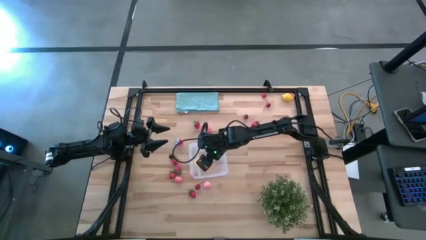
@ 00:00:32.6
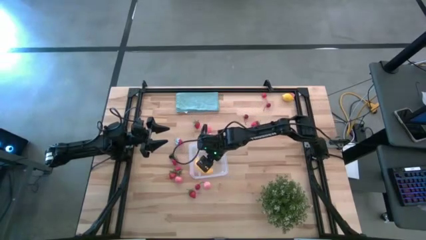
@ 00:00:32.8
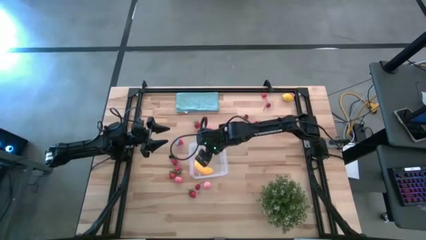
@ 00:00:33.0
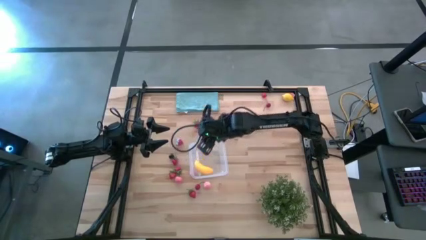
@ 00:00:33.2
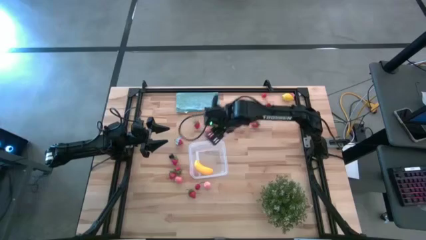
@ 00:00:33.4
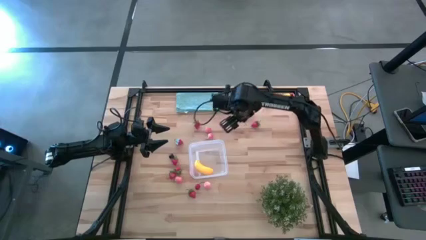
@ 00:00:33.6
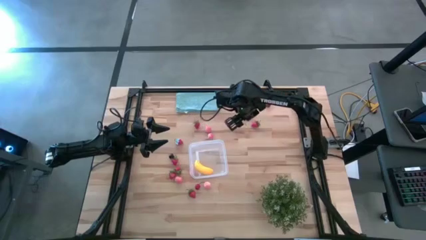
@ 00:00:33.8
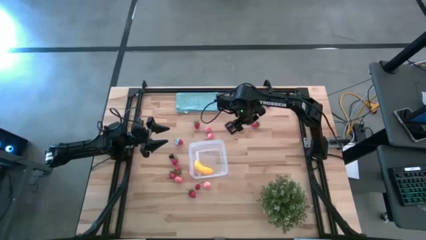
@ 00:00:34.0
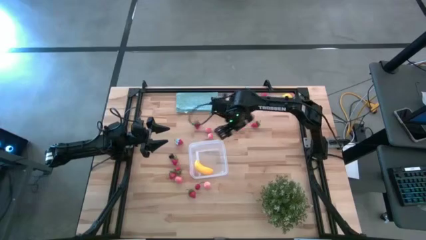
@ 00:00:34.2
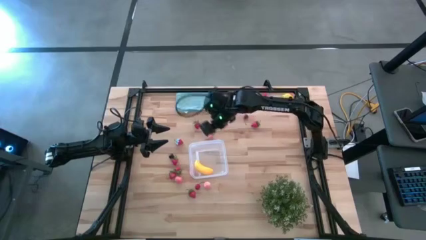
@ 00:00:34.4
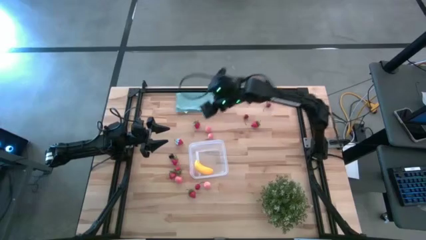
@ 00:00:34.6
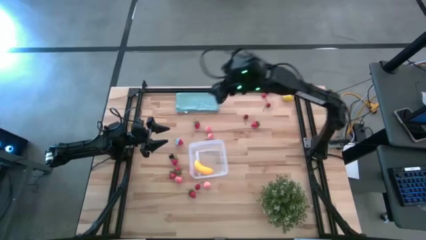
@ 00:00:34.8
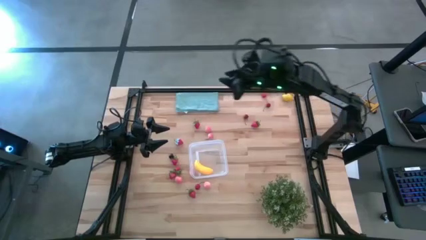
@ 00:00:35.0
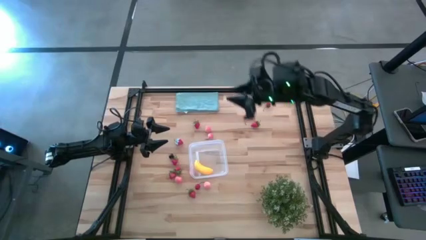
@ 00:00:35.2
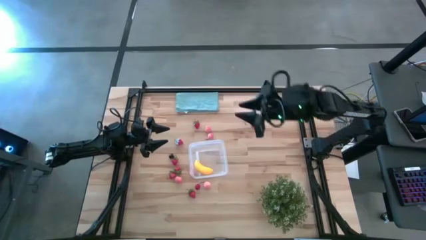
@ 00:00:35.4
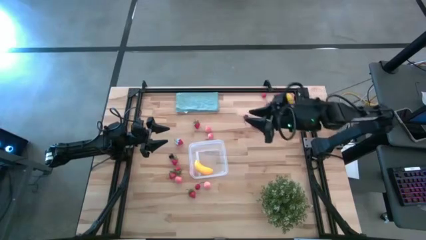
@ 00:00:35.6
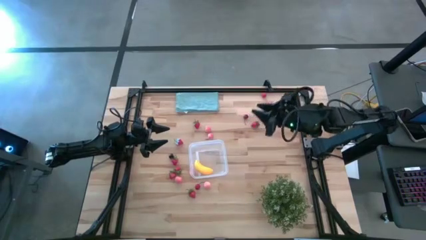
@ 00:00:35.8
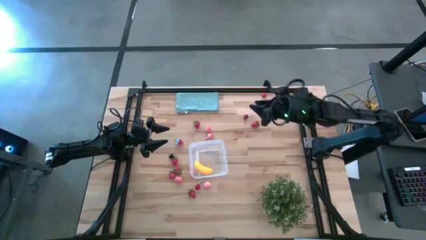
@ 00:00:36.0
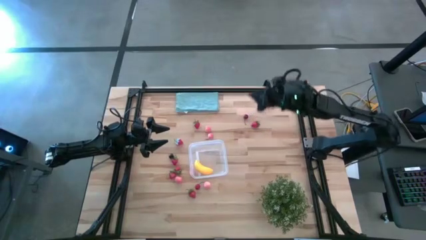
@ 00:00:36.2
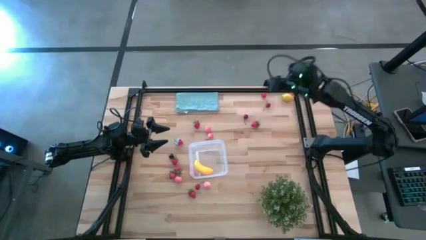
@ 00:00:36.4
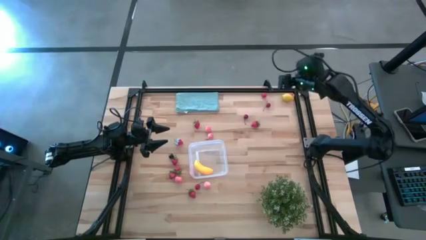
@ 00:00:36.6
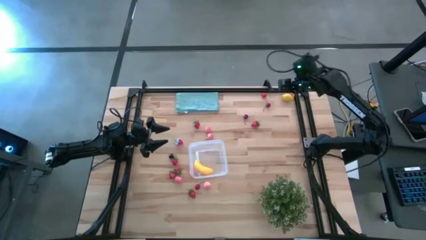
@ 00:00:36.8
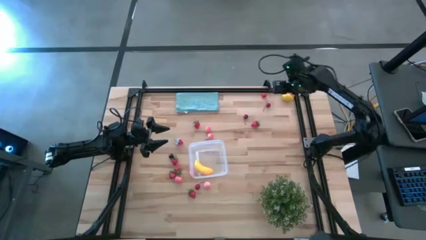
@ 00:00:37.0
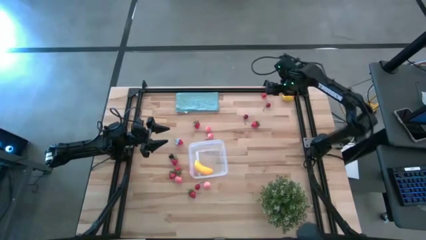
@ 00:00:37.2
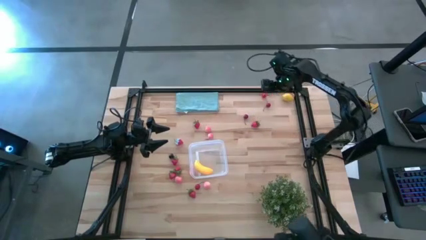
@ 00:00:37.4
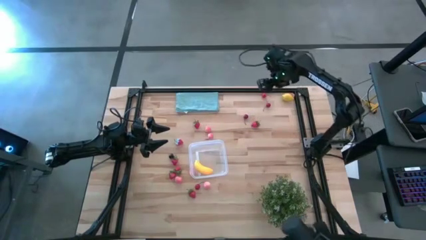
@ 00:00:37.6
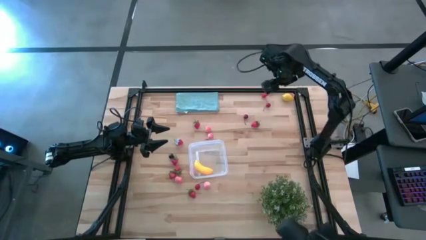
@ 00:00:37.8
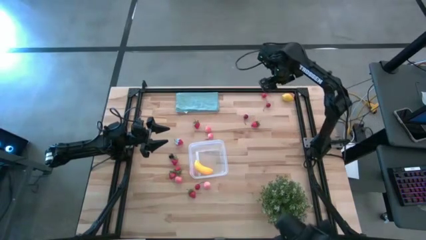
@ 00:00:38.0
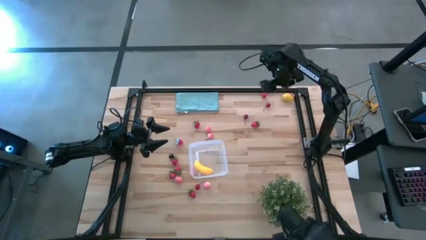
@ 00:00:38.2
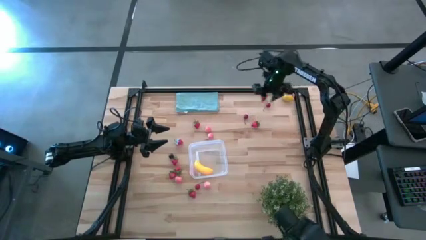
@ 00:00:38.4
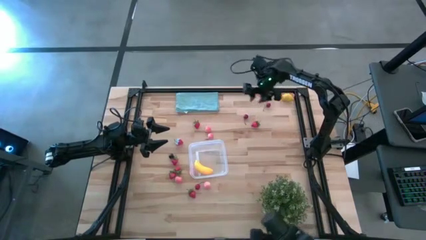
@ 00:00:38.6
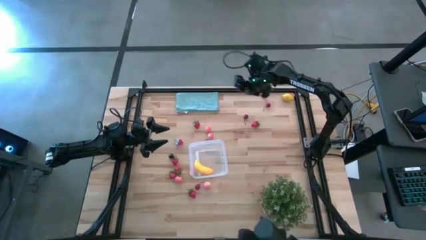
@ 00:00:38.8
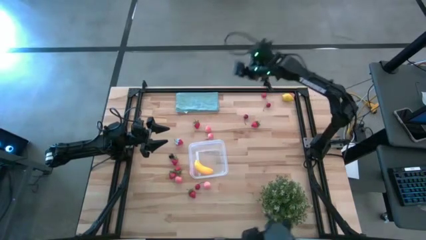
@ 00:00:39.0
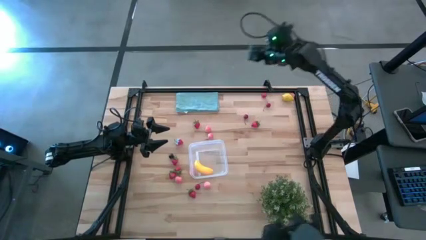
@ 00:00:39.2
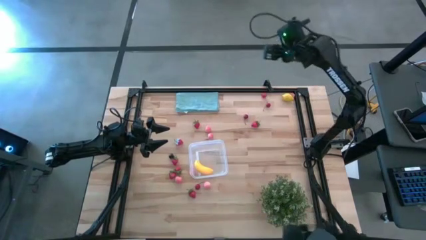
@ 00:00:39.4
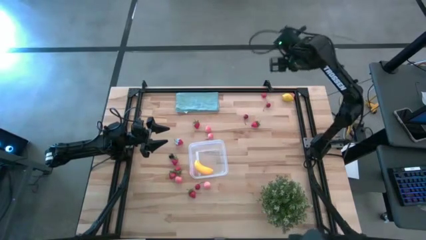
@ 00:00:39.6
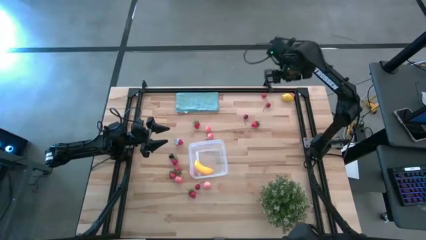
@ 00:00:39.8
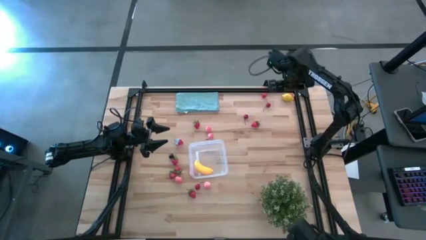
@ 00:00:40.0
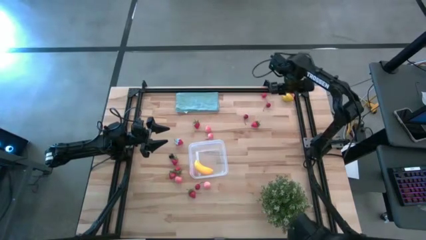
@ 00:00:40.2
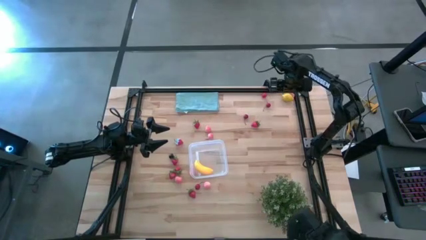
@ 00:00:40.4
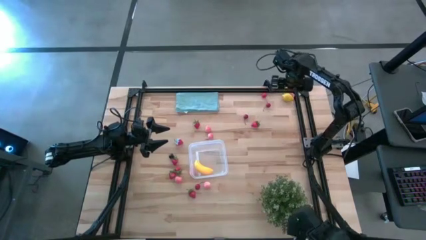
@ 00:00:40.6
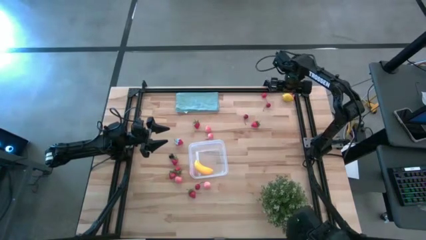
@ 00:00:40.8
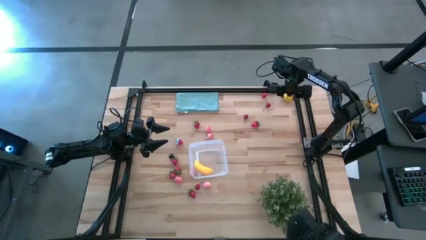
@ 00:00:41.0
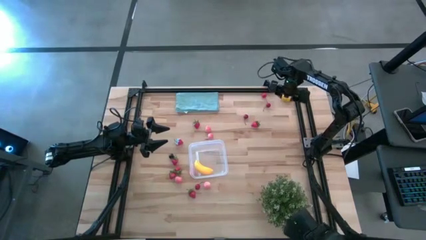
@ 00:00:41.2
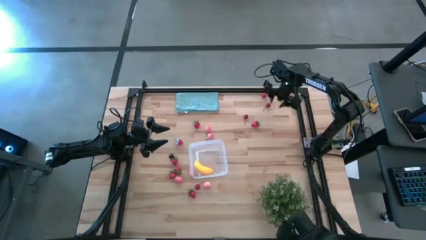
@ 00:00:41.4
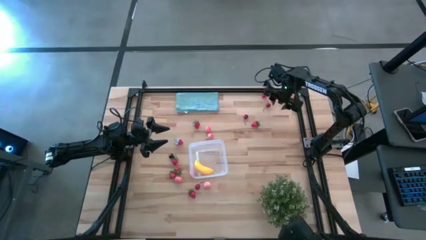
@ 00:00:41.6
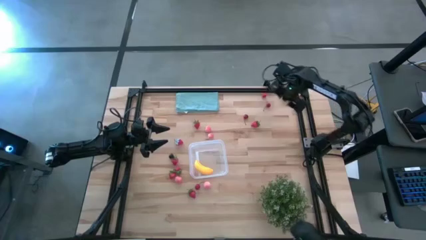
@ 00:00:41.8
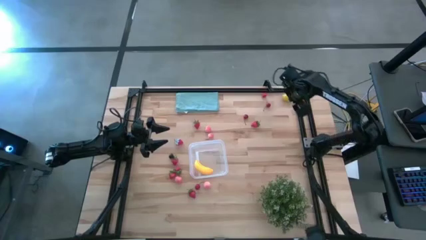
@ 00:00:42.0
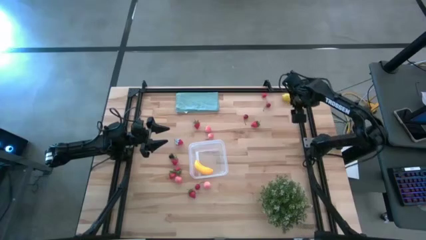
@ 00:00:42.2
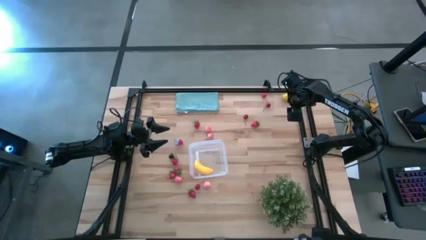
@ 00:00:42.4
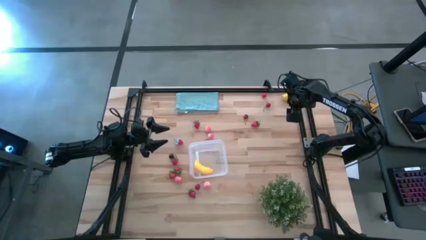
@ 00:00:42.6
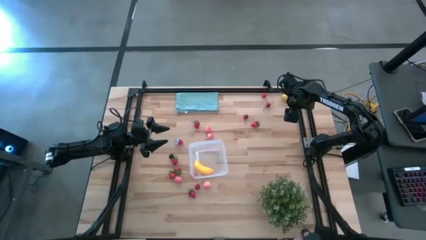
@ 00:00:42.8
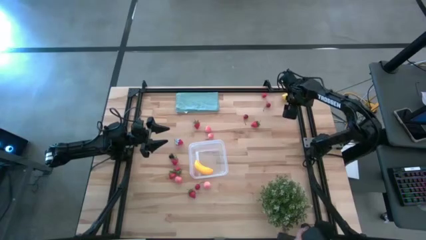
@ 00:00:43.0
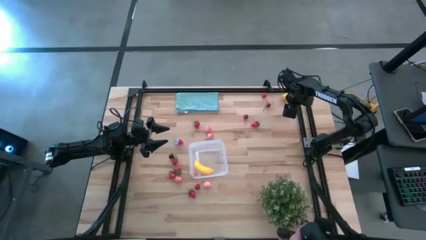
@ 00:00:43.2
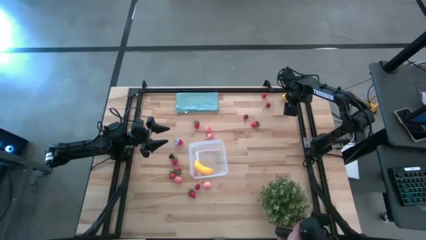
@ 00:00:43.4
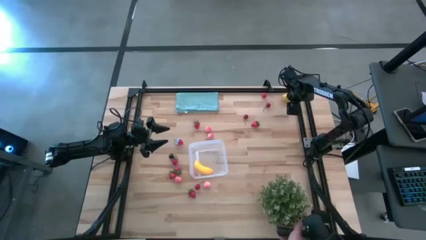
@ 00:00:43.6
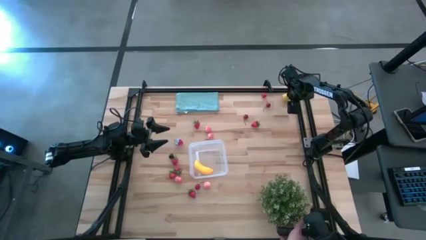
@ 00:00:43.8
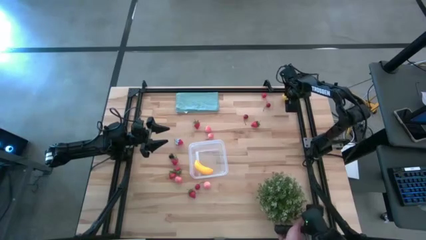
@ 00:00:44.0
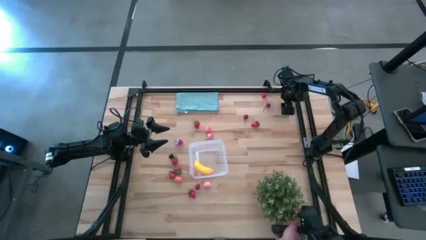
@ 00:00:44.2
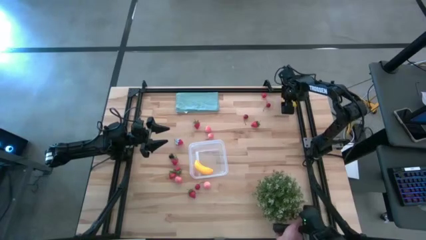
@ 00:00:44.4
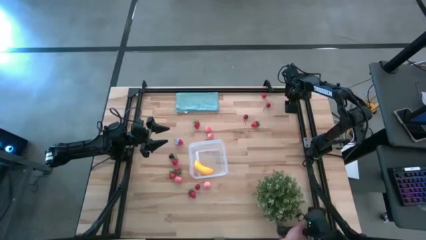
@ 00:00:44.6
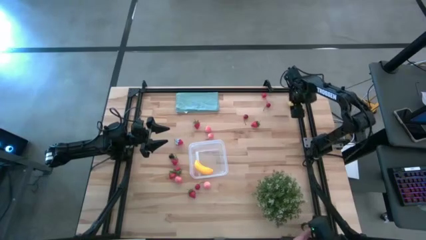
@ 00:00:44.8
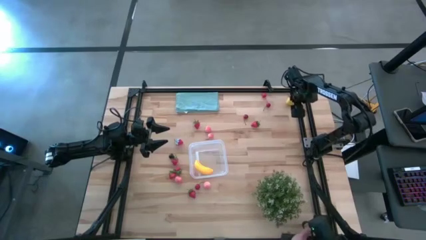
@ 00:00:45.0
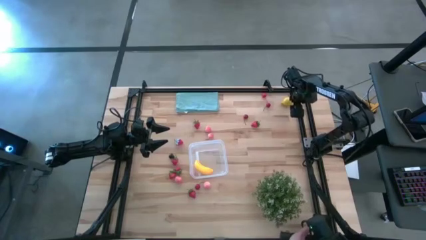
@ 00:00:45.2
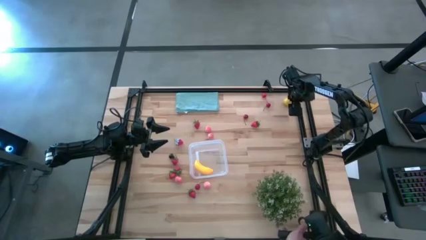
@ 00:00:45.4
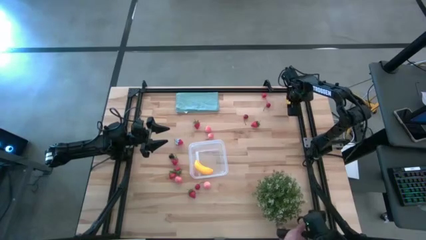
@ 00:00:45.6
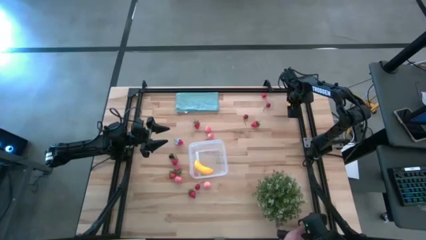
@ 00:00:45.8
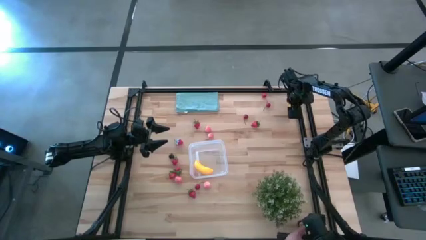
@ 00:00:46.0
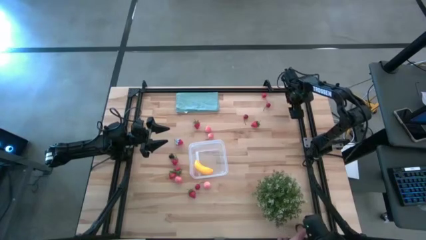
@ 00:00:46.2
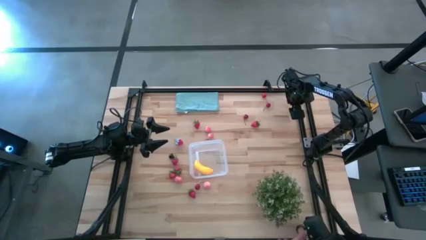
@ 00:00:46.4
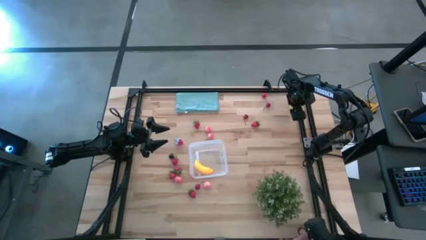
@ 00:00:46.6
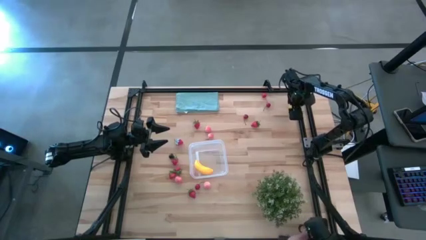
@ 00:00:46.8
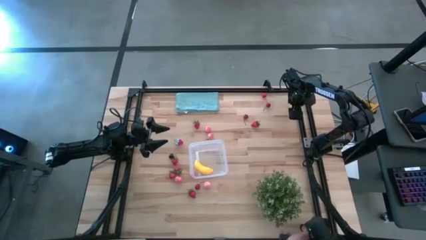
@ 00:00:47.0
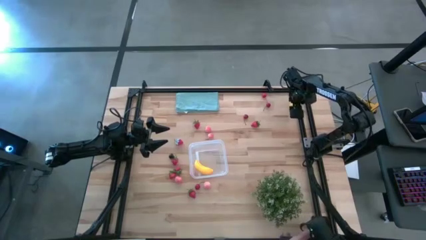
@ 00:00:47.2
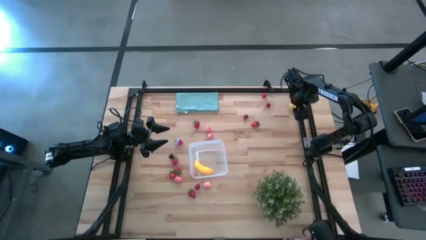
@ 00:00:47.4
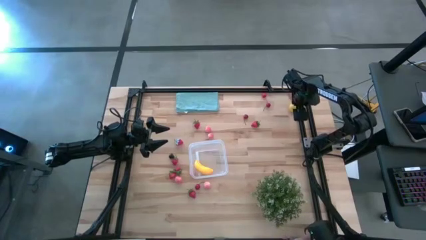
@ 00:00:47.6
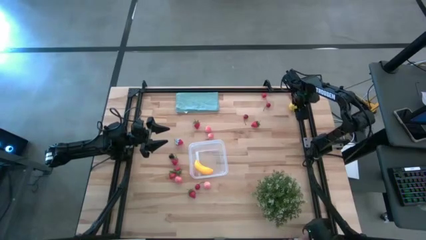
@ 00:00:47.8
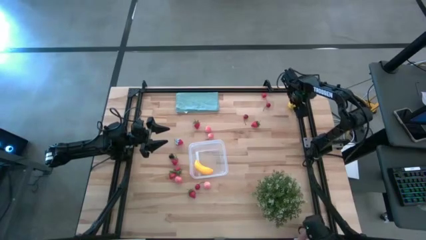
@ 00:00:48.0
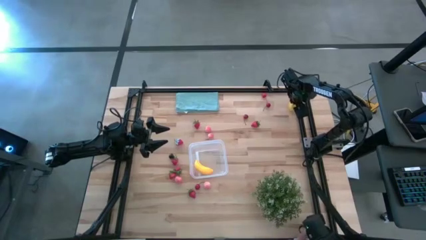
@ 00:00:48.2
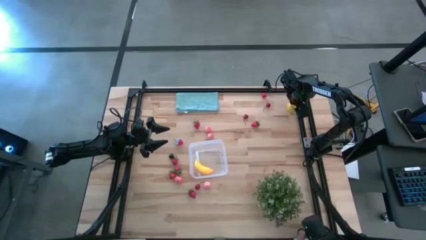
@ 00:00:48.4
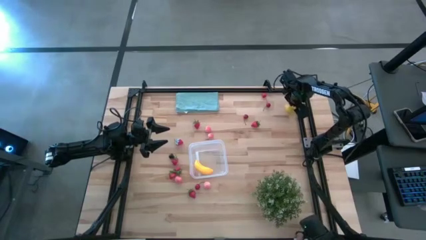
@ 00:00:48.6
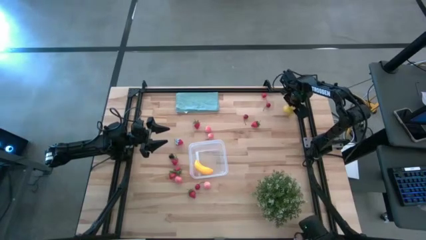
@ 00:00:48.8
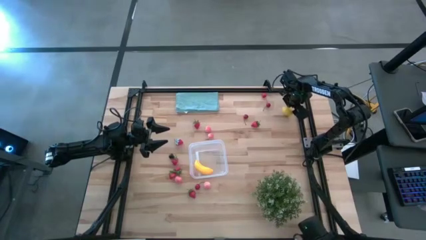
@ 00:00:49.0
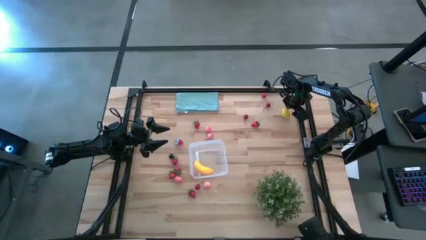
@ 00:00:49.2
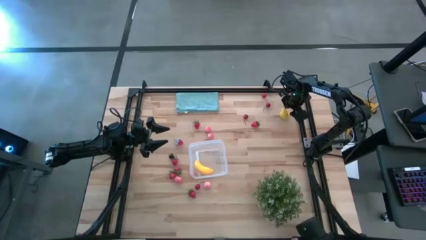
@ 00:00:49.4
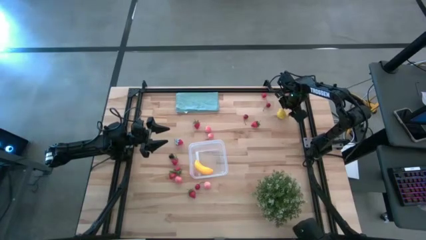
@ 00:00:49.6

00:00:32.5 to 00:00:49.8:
Task: Pick and placing Produce into tupperware
Put the yellow lemon into the transparent bin
